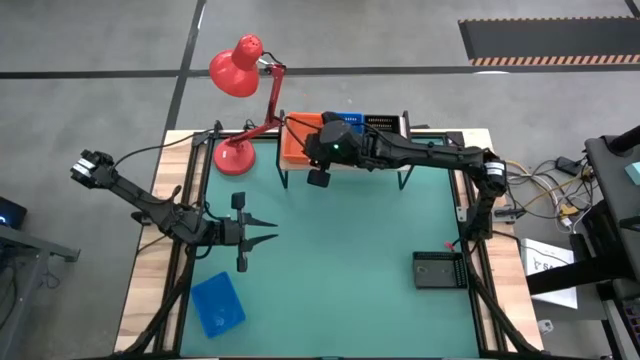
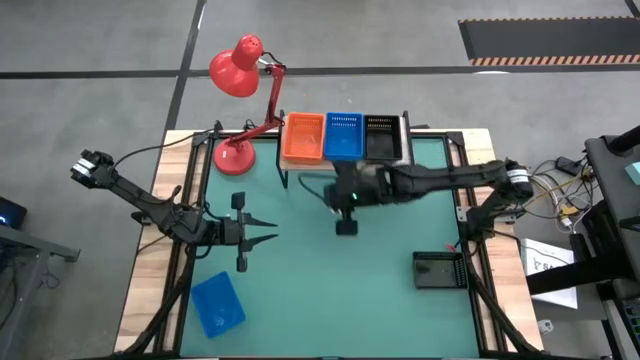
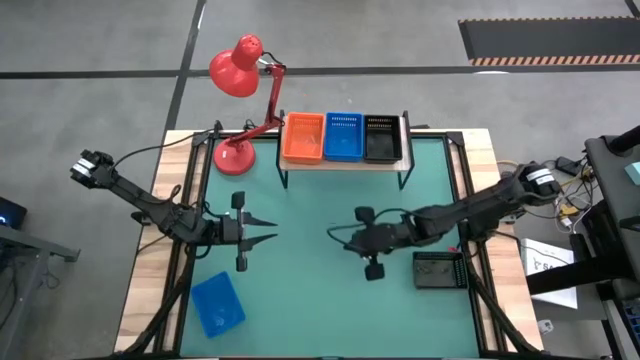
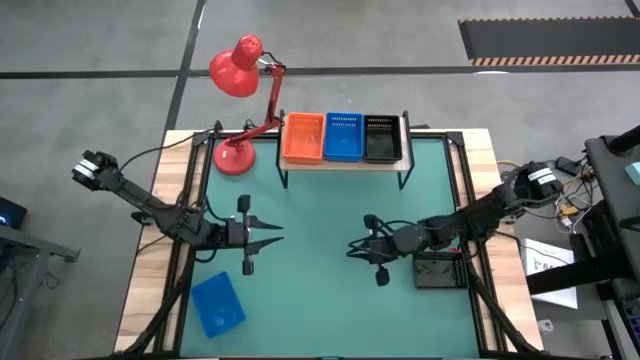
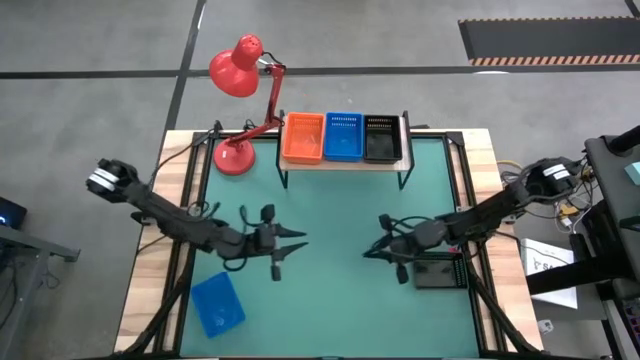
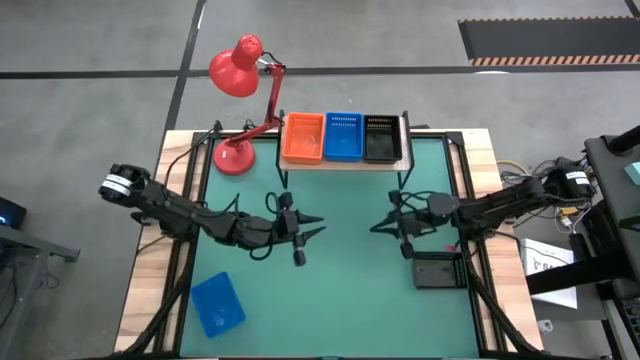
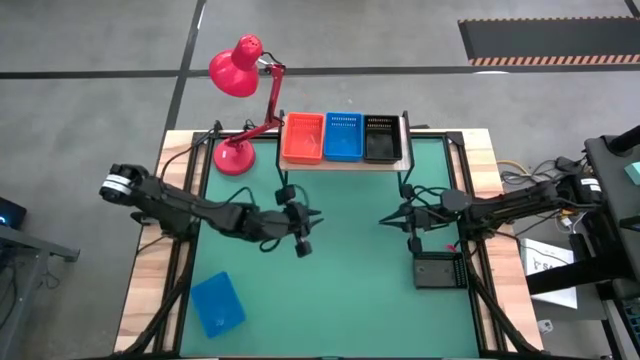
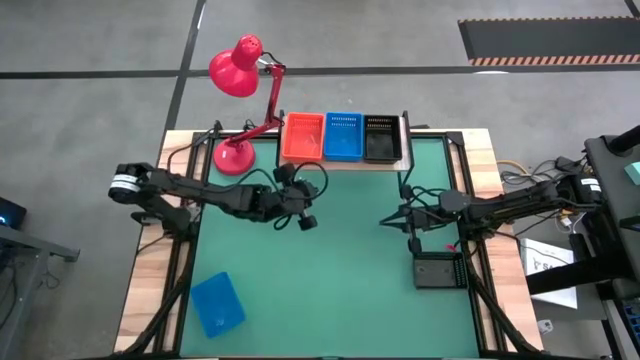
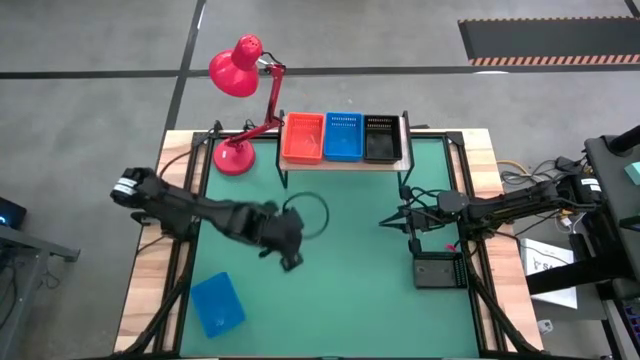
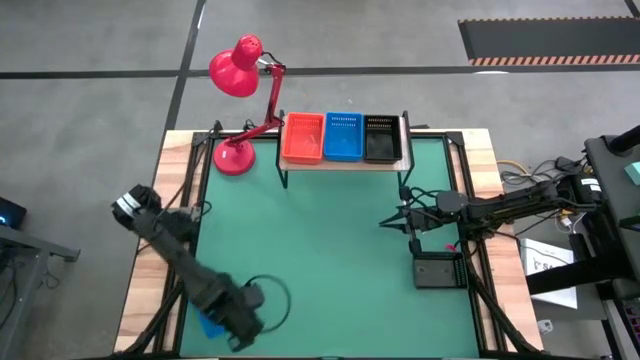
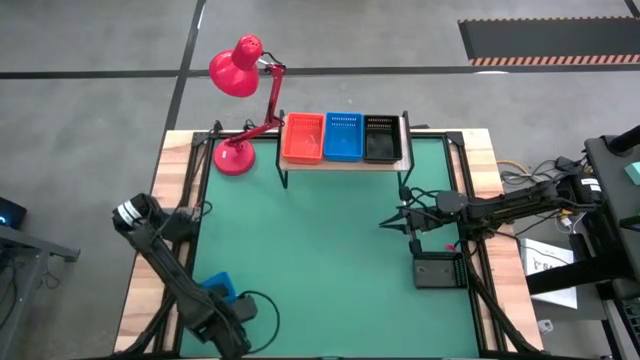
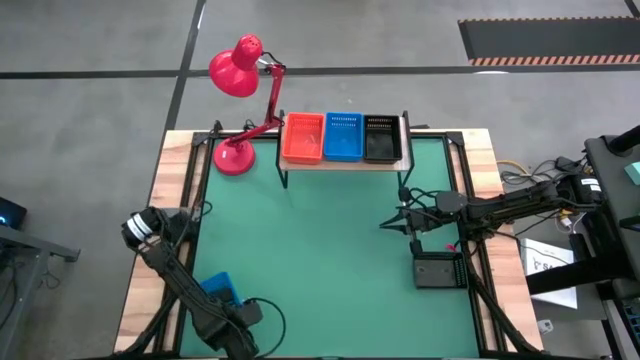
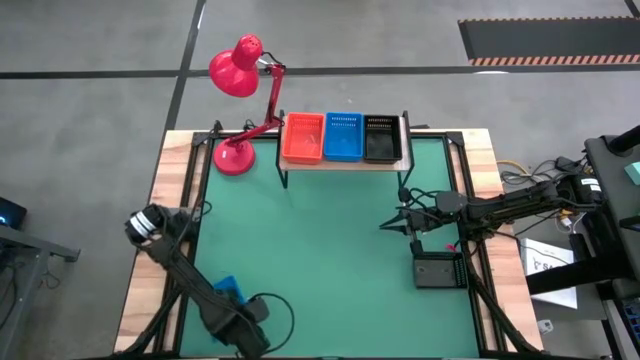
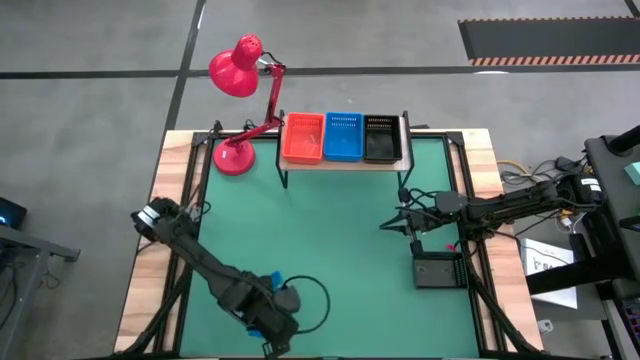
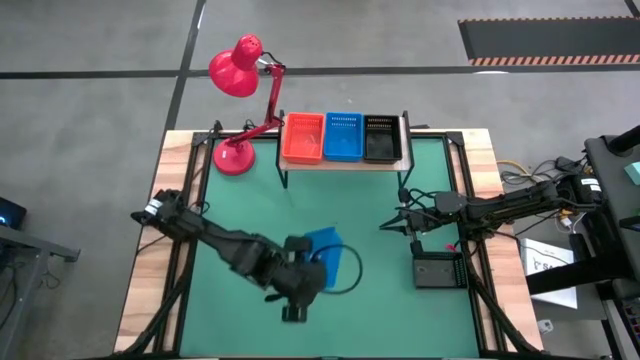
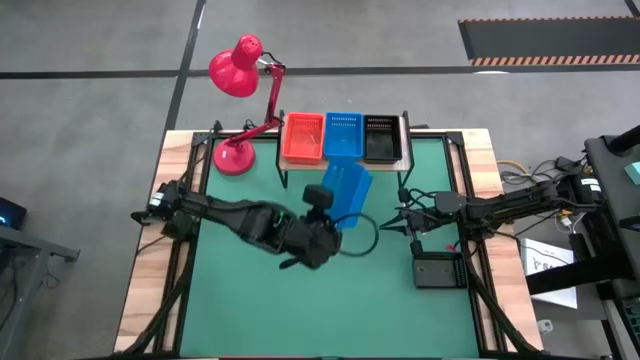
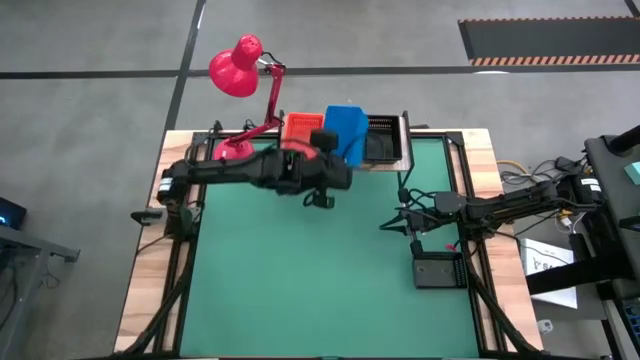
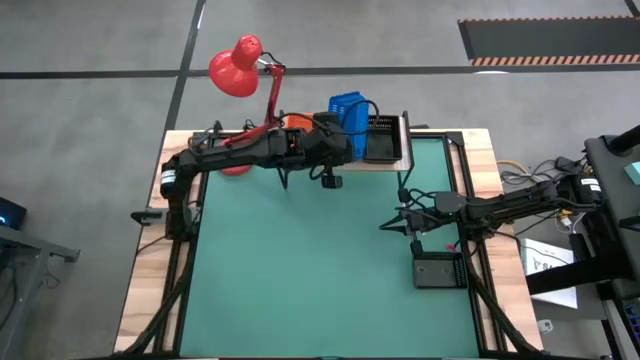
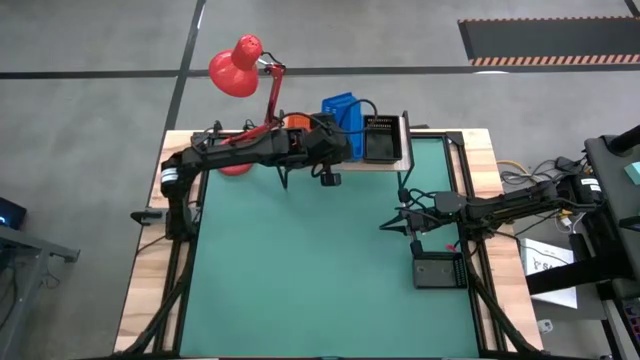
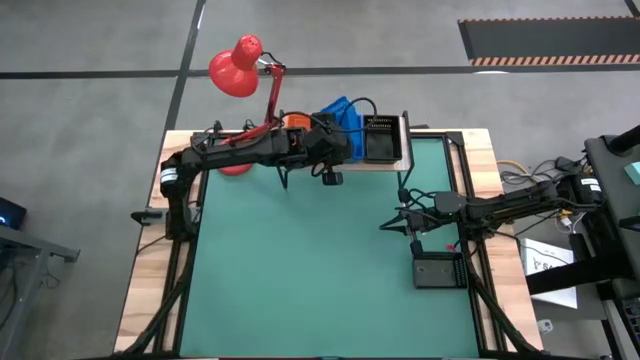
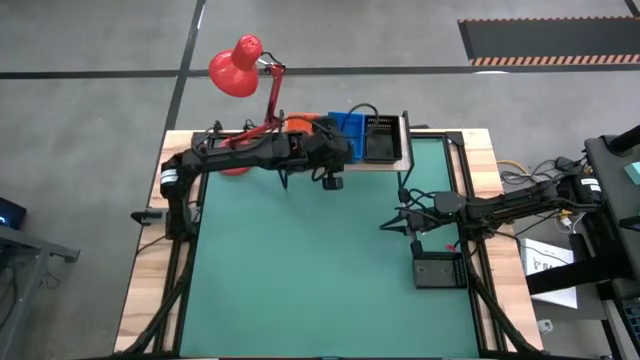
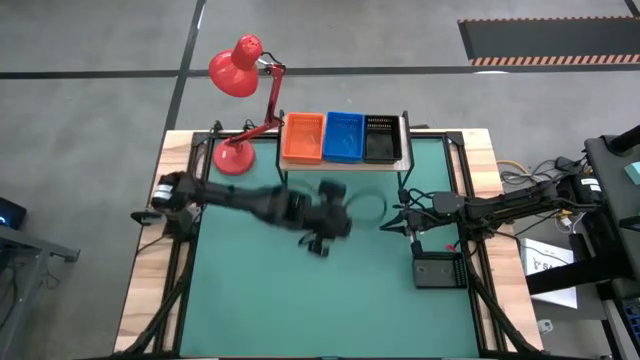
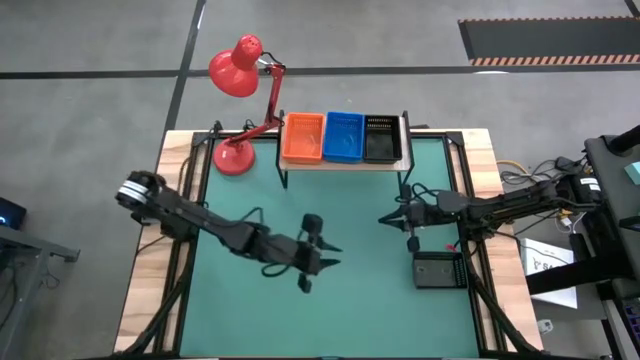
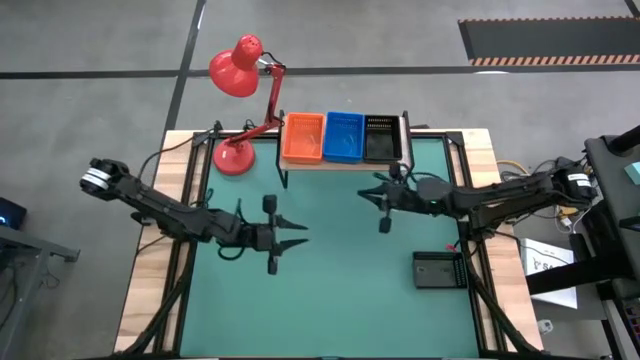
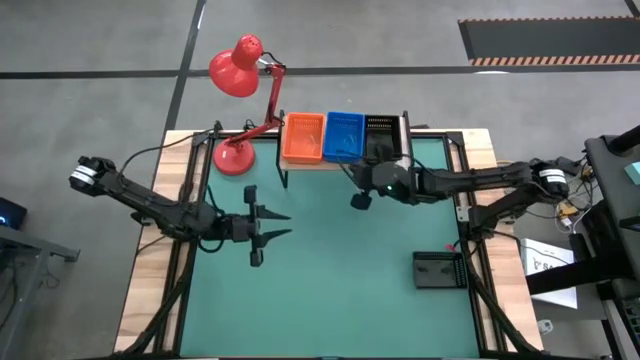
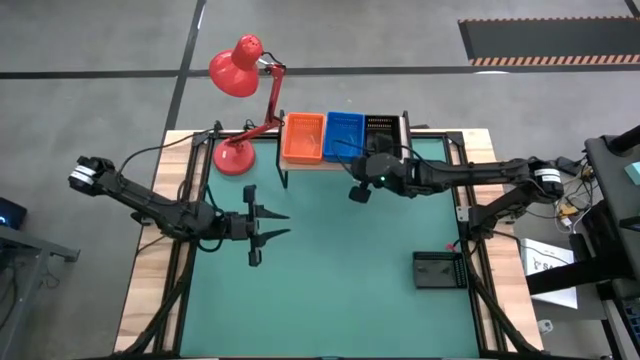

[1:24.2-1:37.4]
Task: Stack baskets on shelf by color
Stack the blue bin on the other blue bins on the shelf

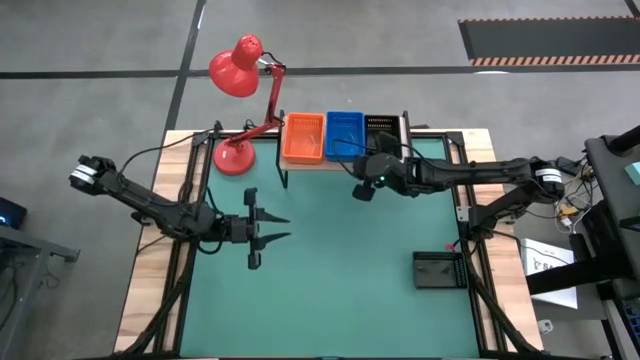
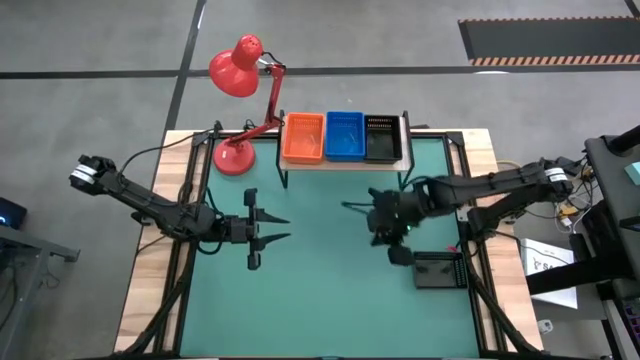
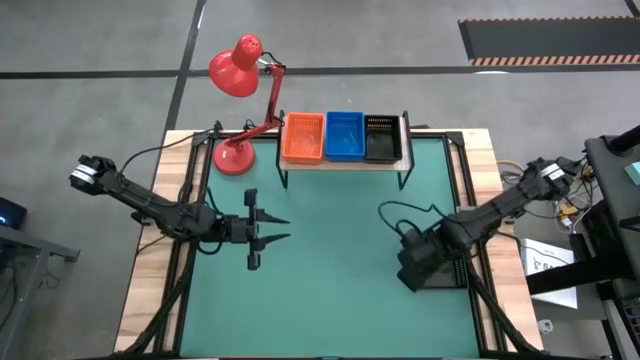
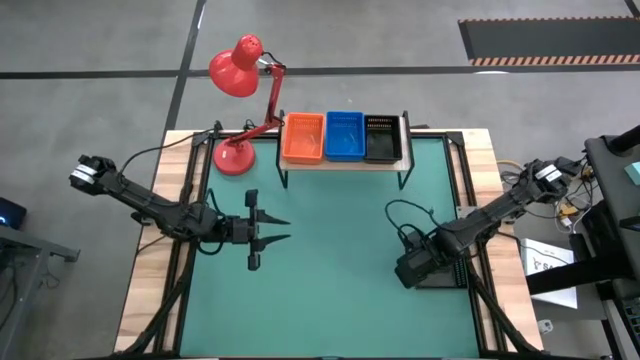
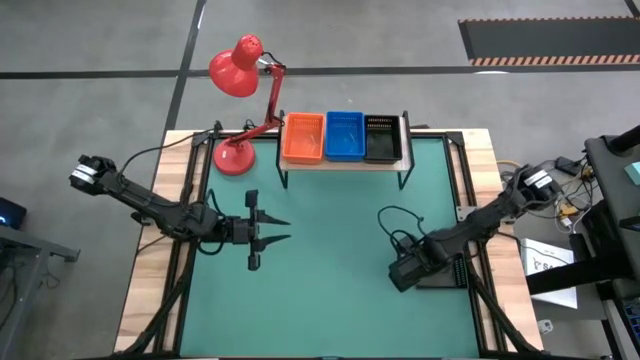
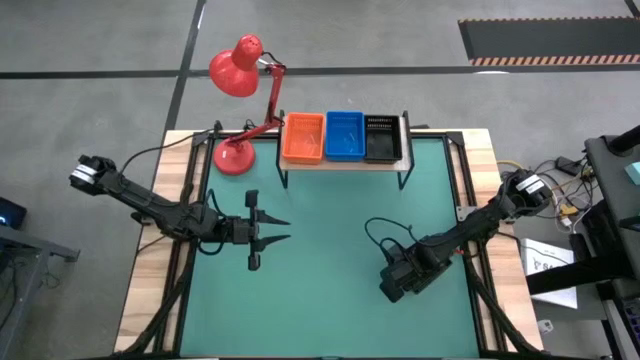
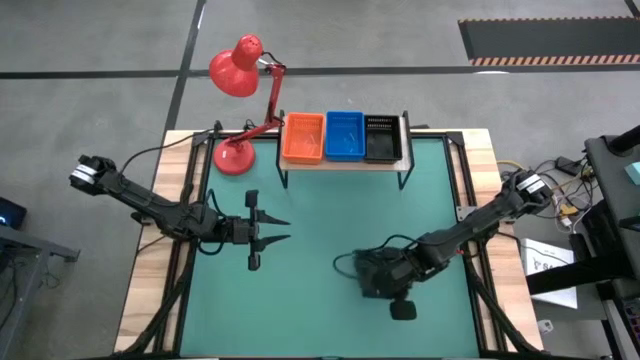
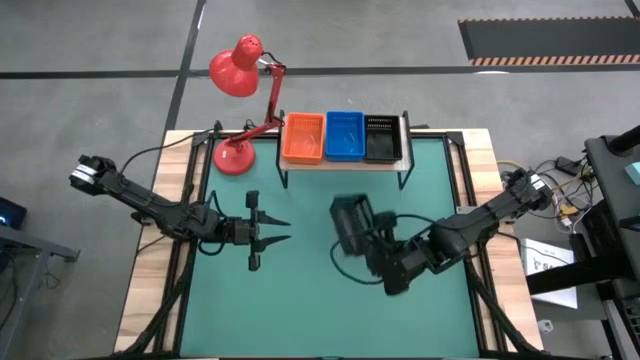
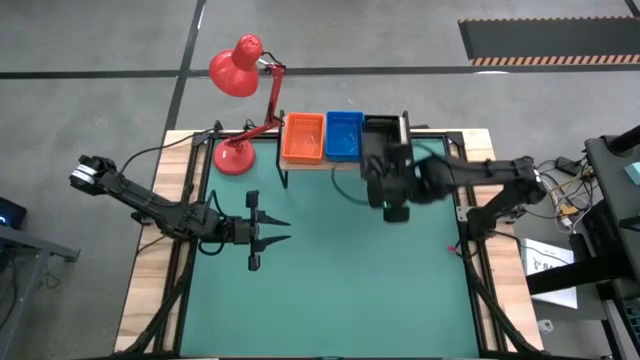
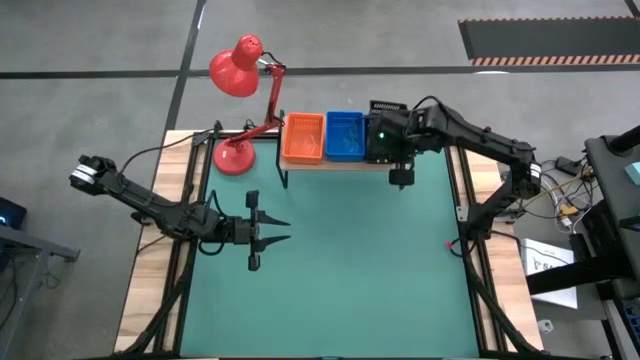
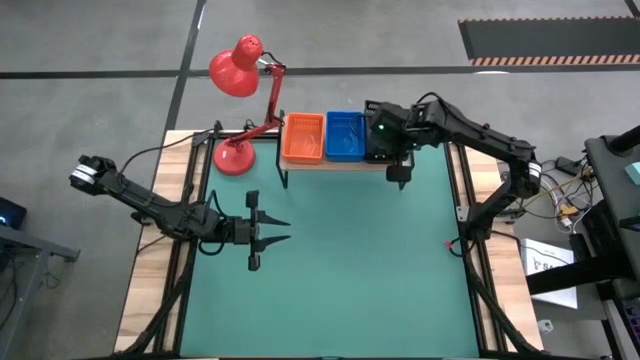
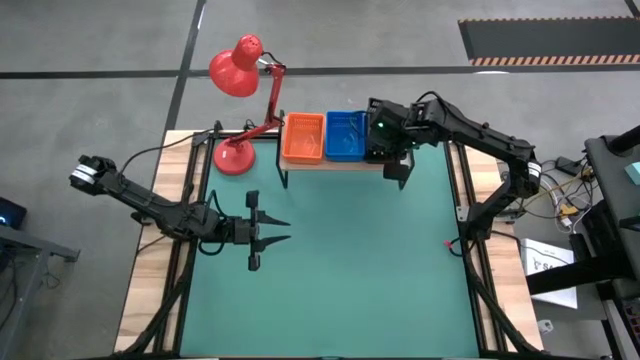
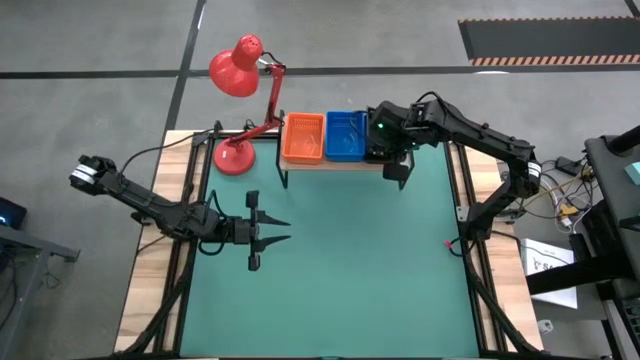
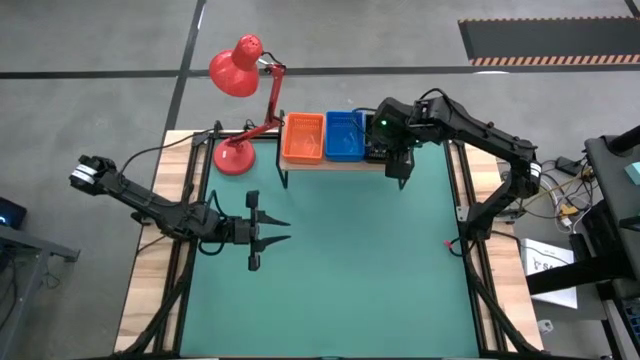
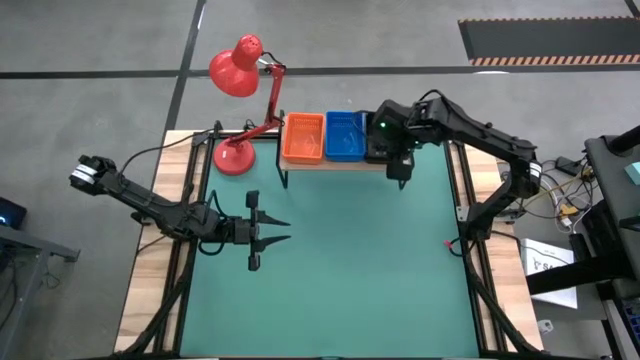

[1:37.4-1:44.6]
Stack the black bin on the other black bins on the shelf
